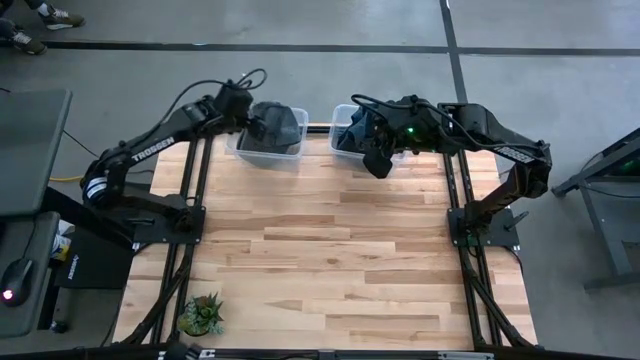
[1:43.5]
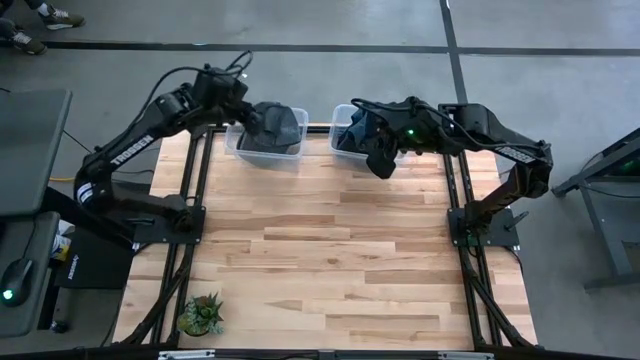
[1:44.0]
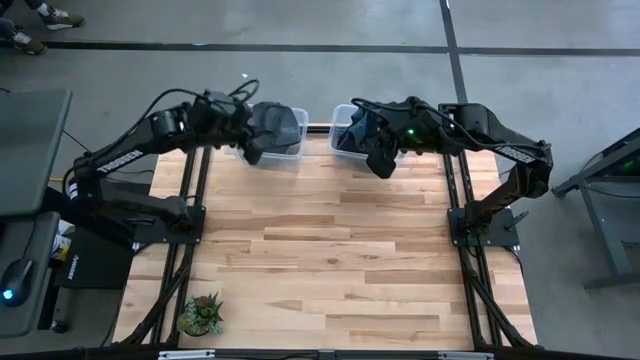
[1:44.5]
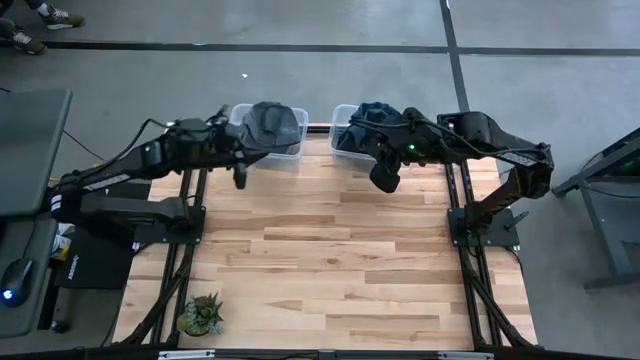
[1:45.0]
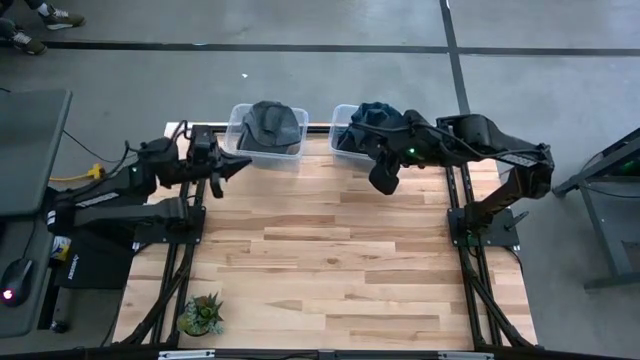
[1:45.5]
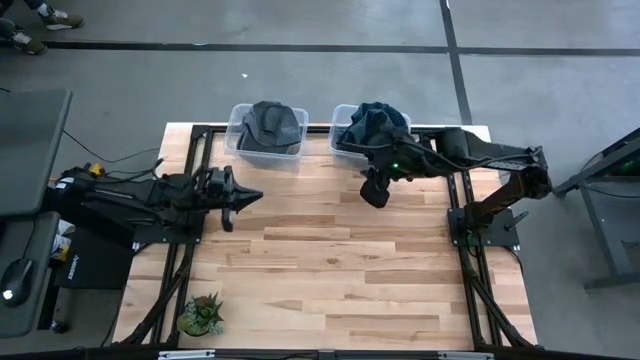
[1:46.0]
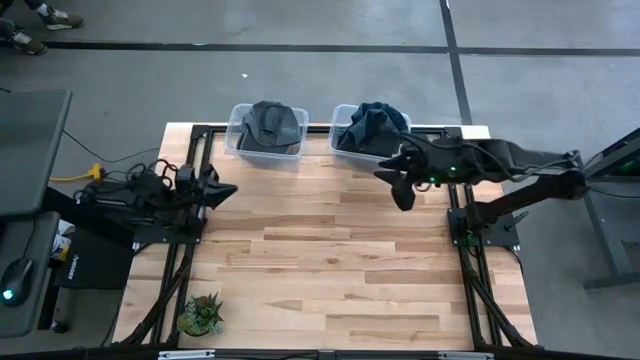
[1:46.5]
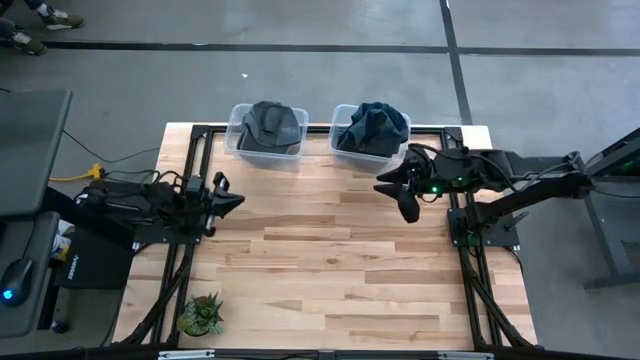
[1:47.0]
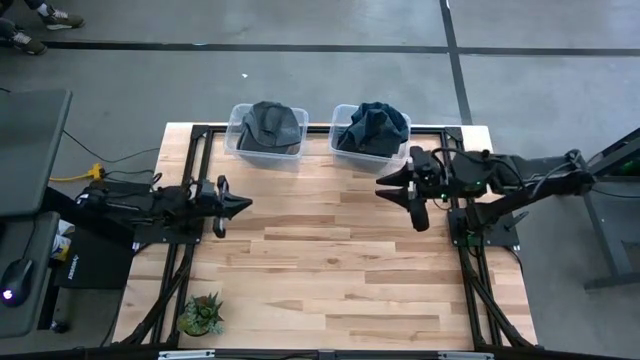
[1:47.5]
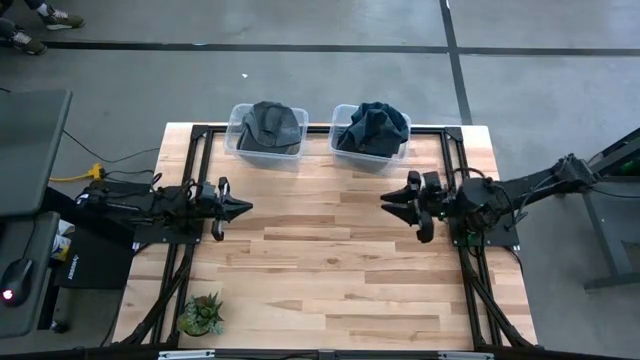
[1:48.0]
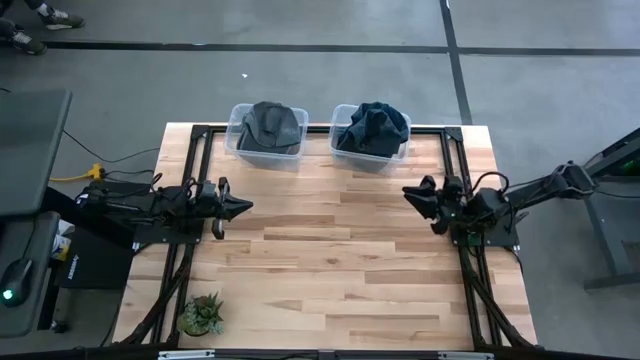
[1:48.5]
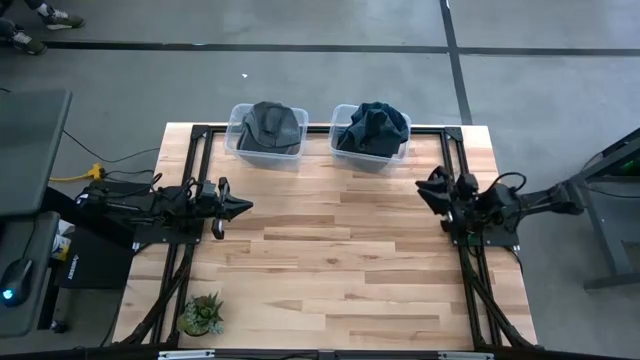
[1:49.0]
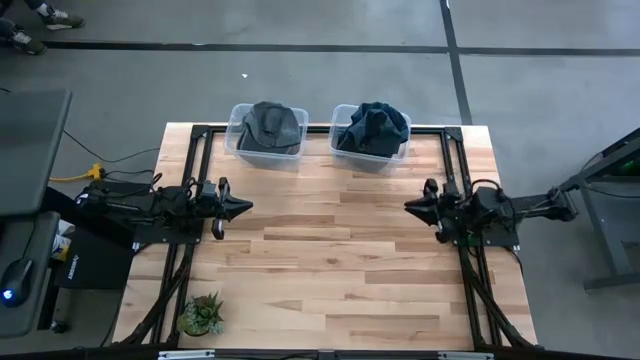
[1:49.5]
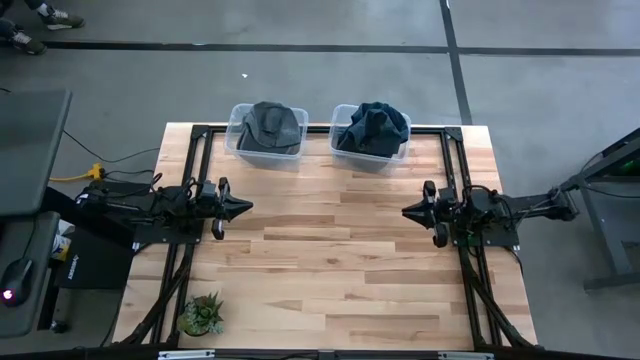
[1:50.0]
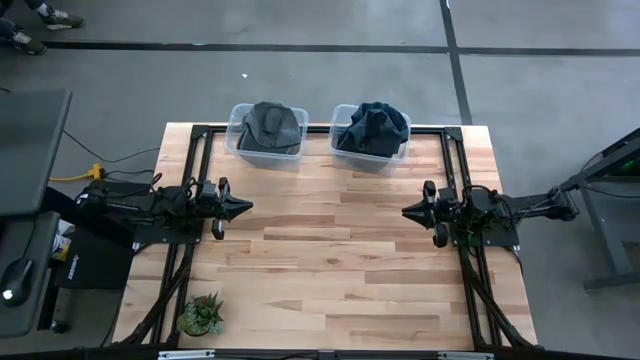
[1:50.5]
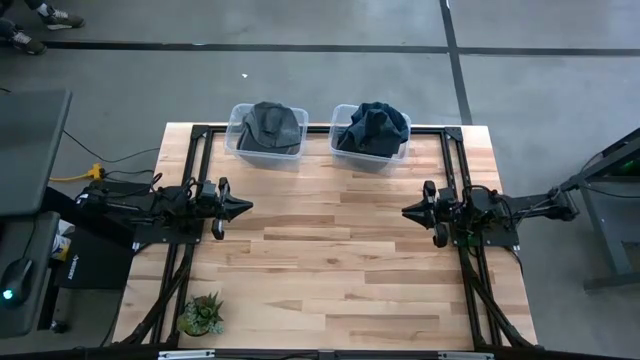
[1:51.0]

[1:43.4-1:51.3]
Task: Pick & Place hat
Return to Home Position

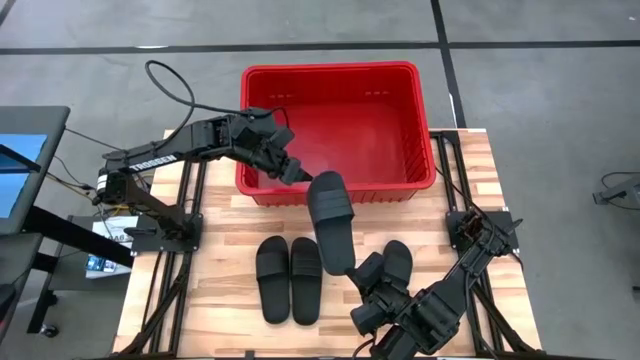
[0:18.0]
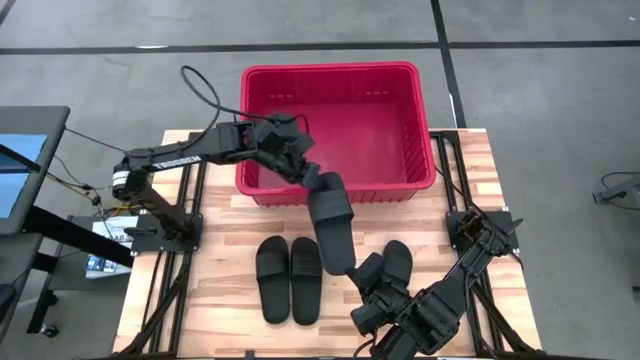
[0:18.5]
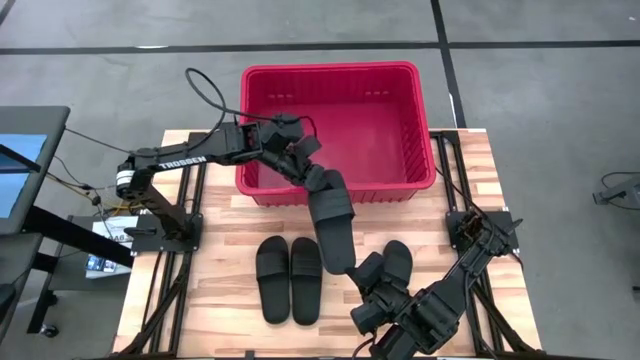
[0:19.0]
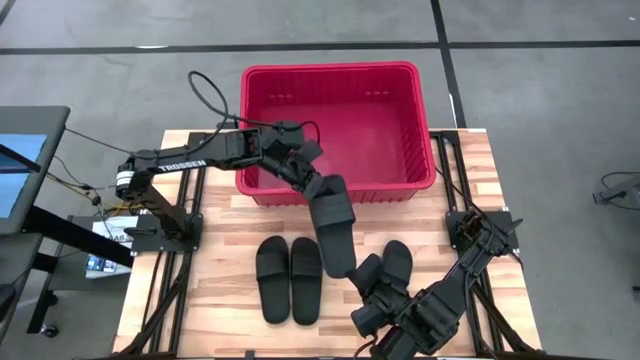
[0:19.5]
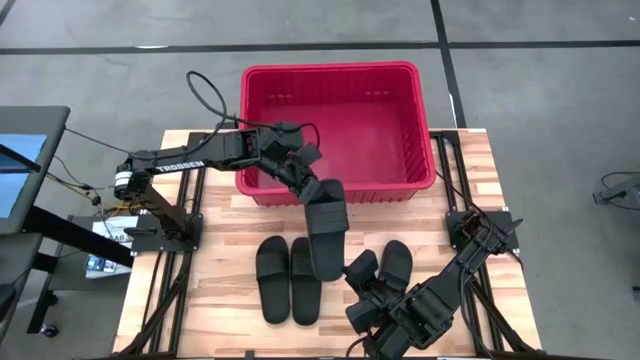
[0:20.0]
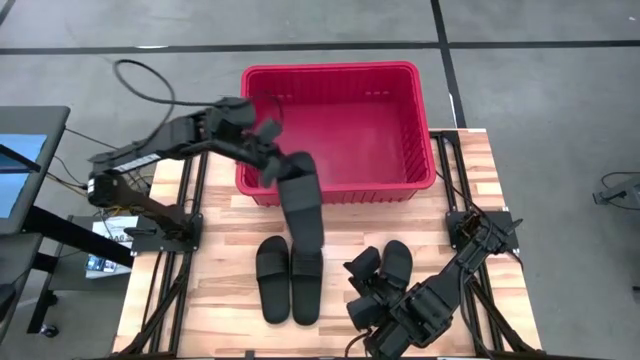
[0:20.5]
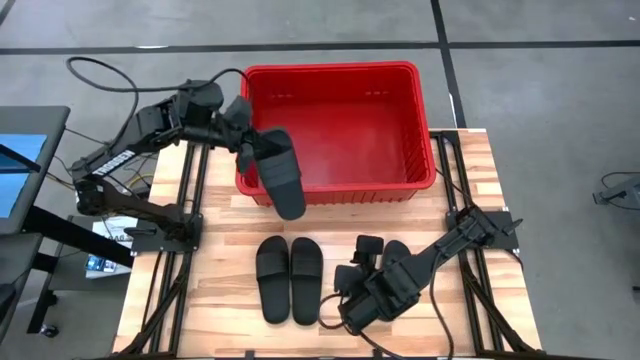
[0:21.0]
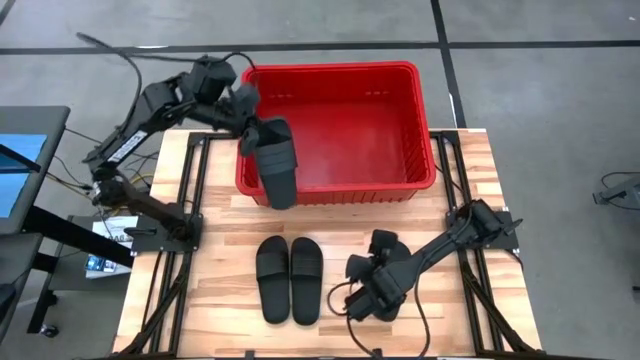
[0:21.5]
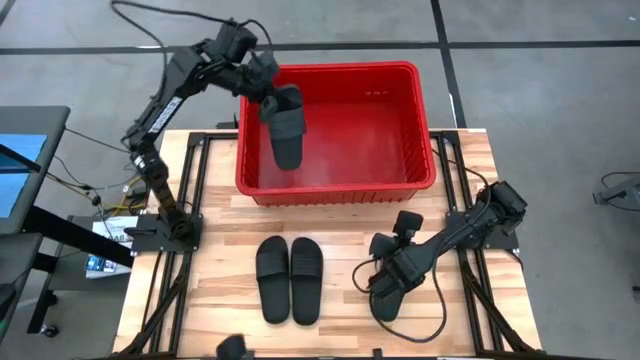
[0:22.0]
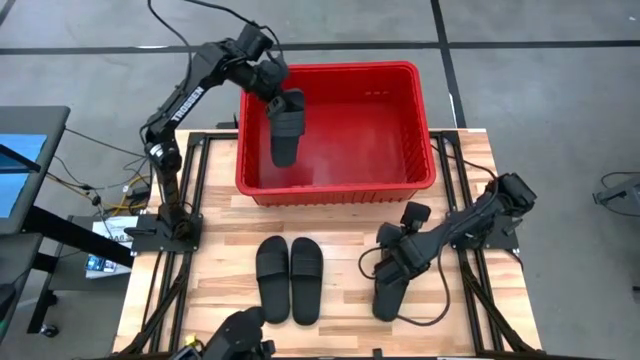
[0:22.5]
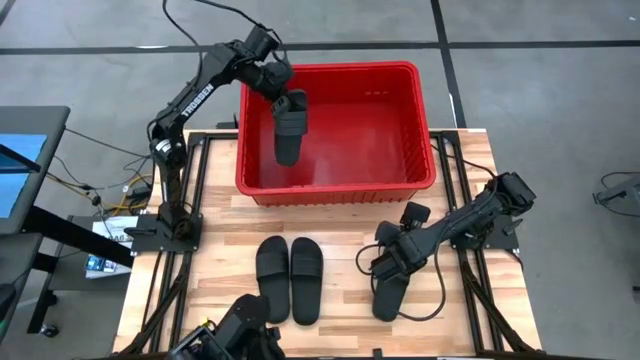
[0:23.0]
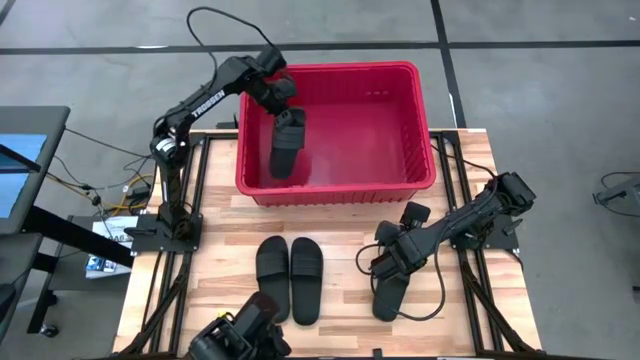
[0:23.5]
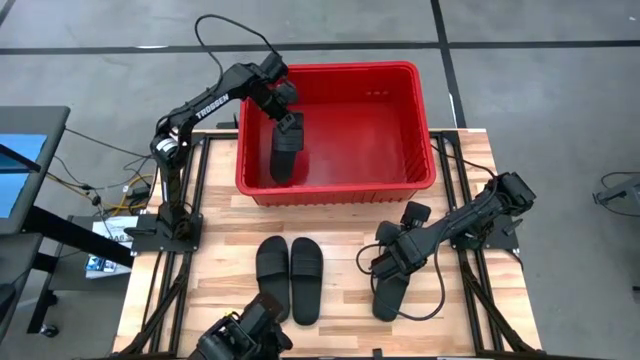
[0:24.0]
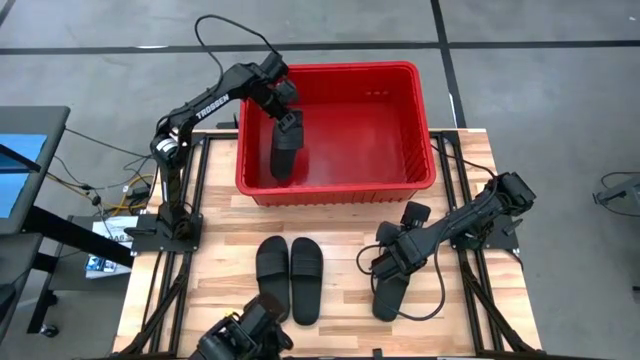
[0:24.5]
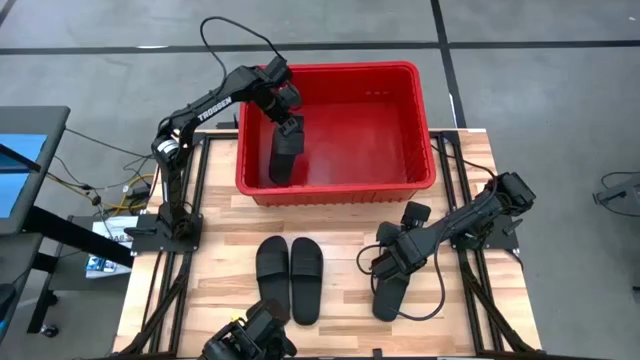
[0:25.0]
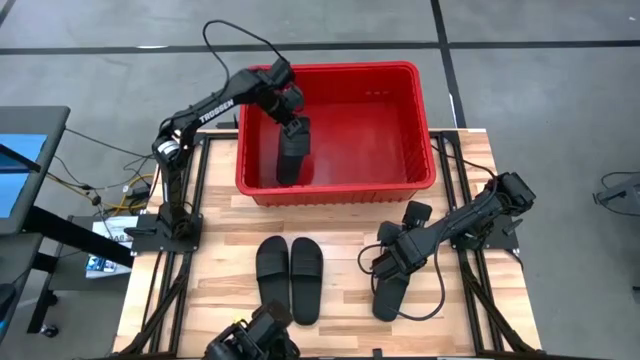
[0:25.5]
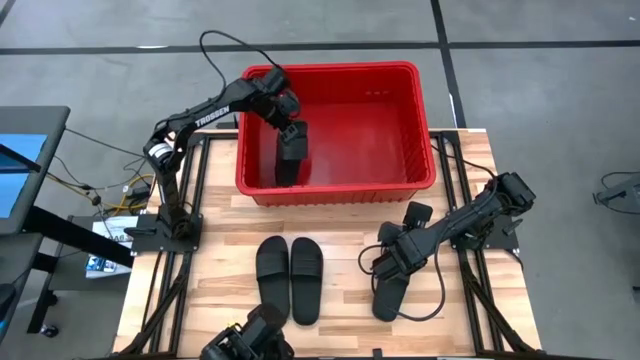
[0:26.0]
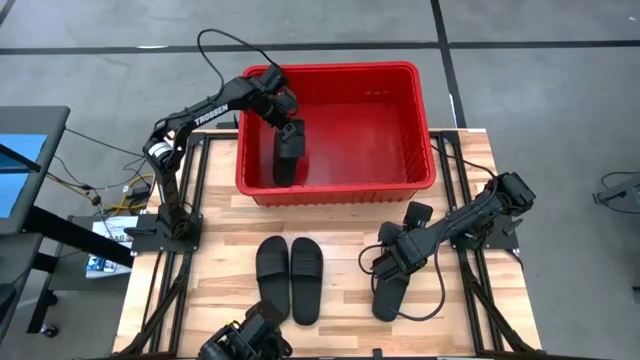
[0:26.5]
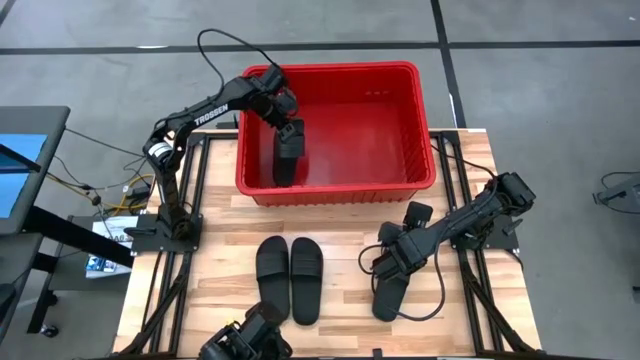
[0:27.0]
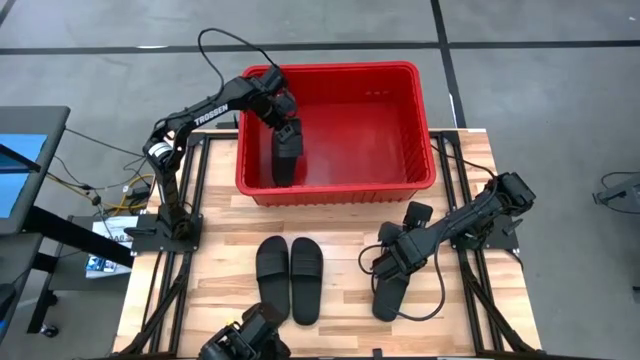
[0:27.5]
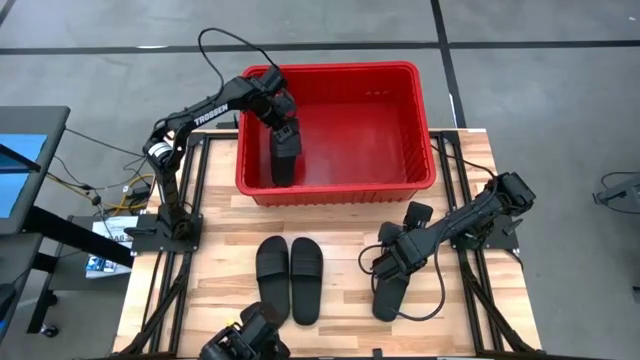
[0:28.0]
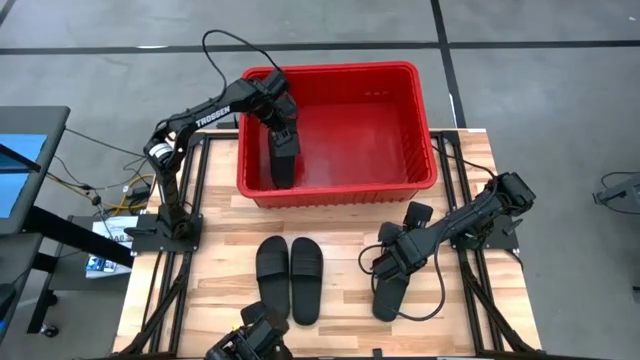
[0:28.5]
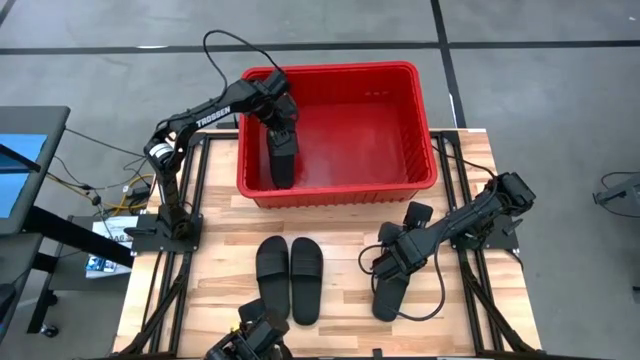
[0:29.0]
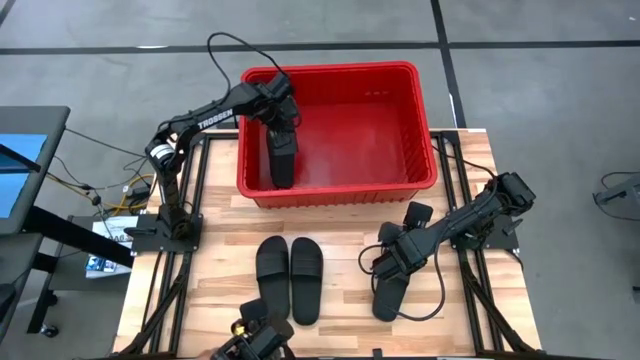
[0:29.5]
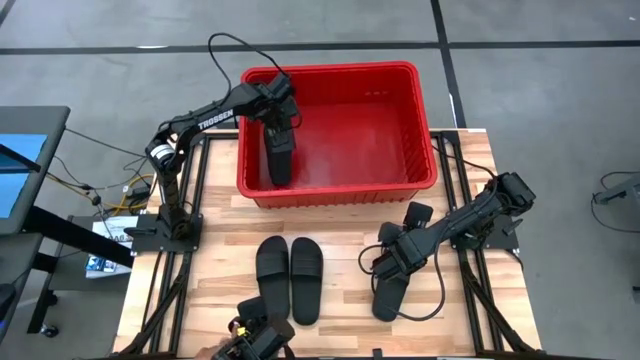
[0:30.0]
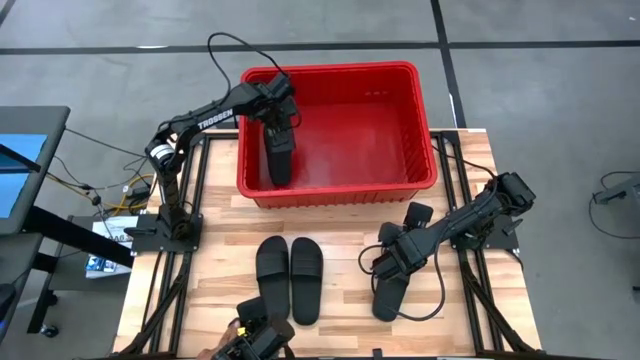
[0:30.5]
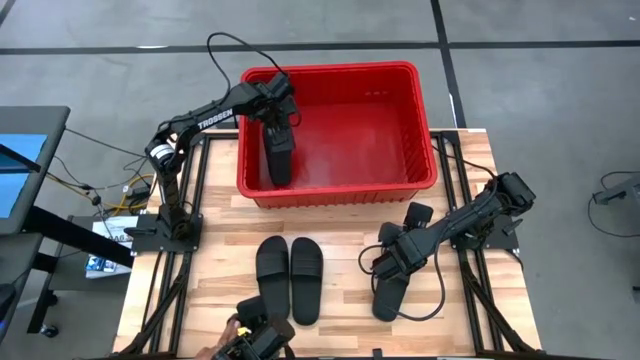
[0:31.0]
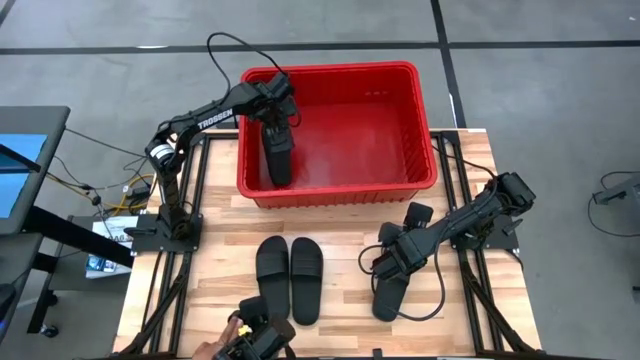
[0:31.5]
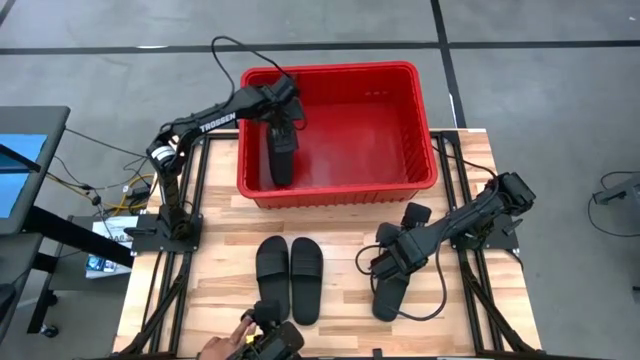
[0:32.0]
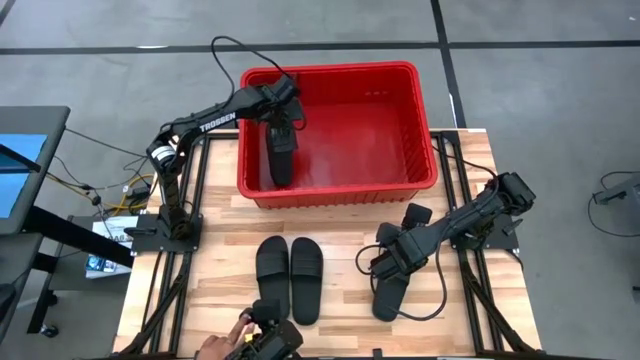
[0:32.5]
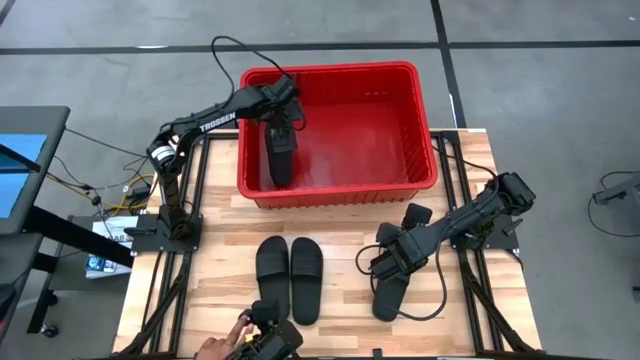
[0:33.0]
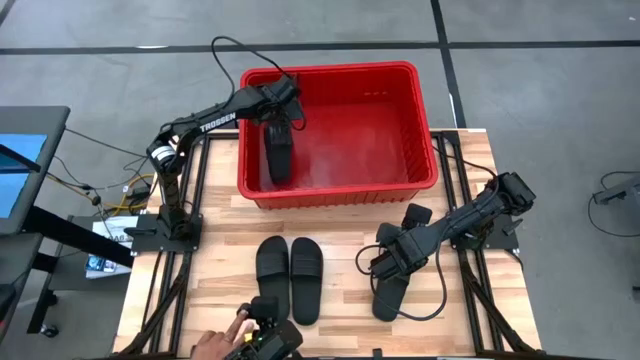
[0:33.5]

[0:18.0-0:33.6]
Task: Pick and place slides into bin
Put the black slide into the red organizer bin
